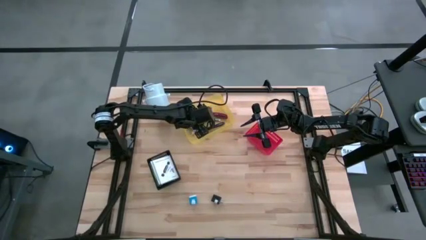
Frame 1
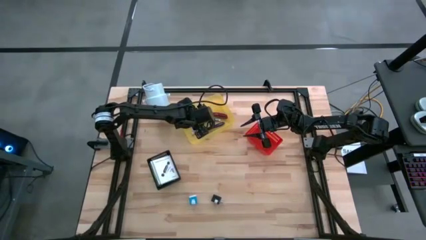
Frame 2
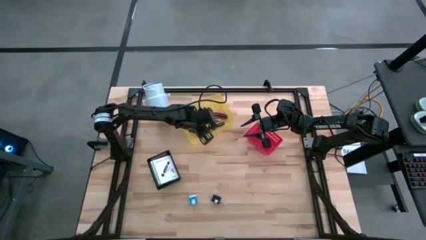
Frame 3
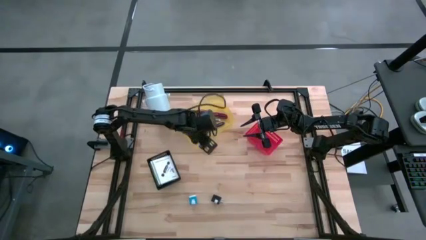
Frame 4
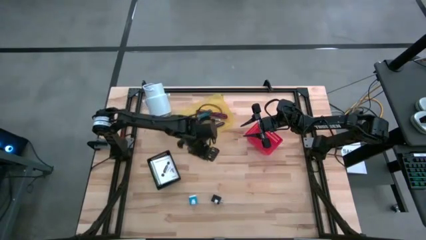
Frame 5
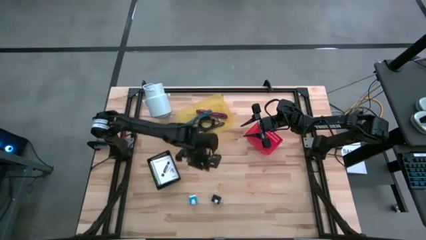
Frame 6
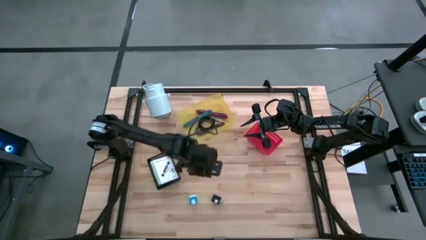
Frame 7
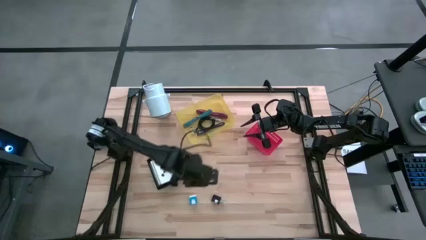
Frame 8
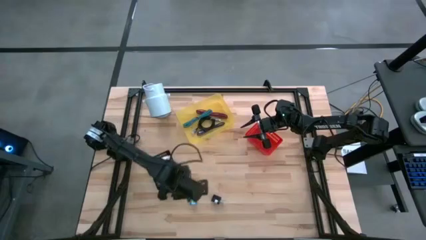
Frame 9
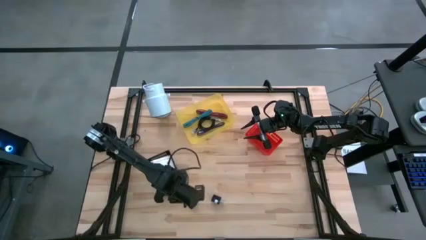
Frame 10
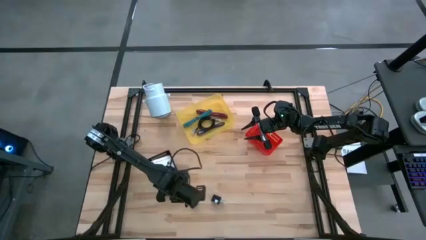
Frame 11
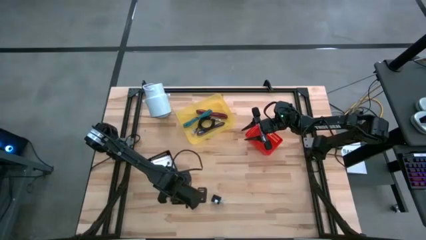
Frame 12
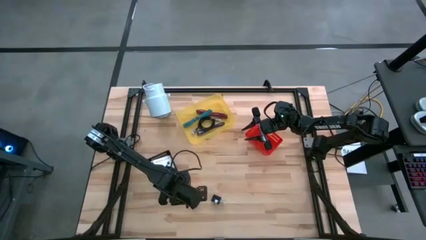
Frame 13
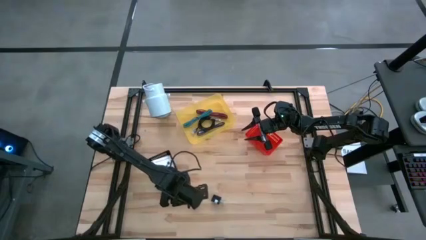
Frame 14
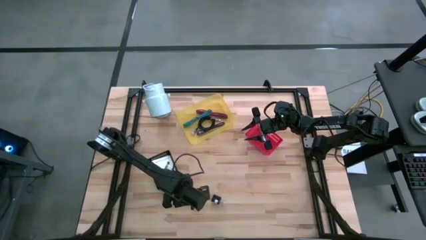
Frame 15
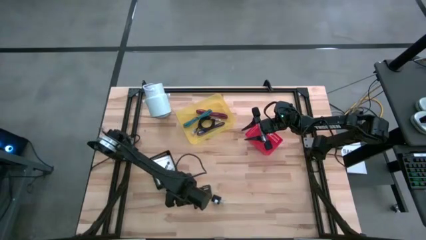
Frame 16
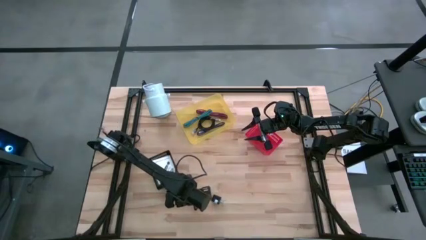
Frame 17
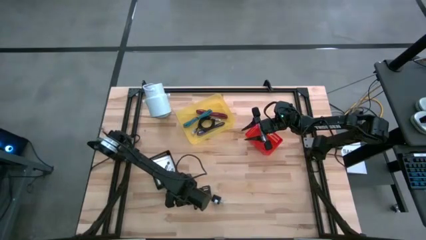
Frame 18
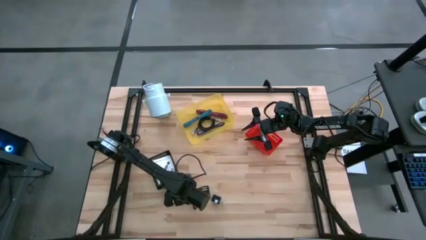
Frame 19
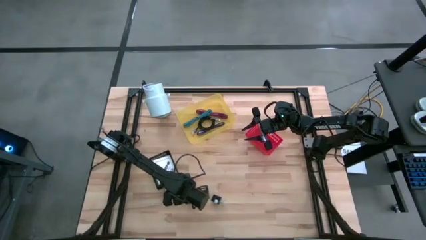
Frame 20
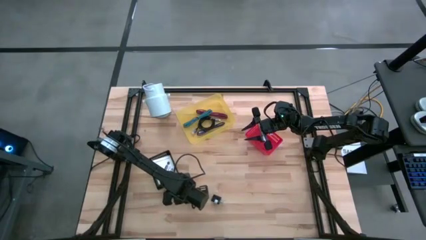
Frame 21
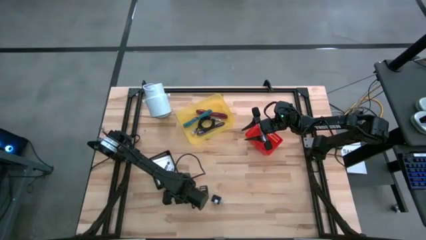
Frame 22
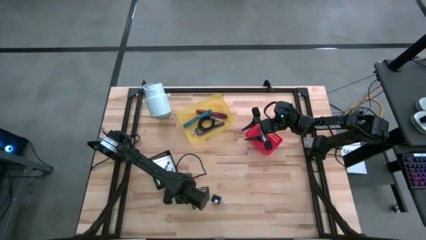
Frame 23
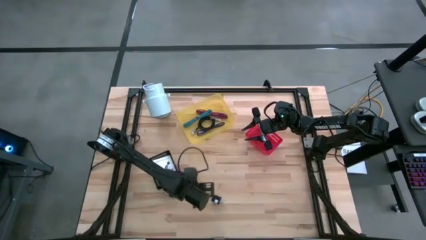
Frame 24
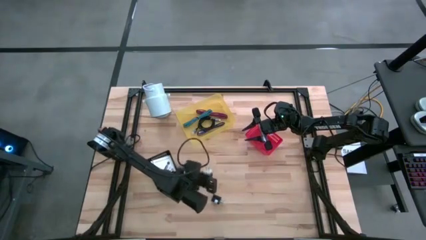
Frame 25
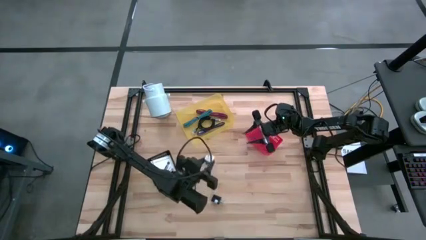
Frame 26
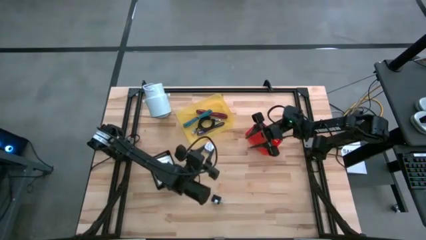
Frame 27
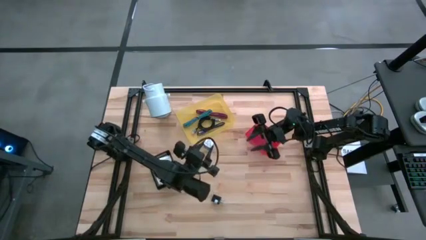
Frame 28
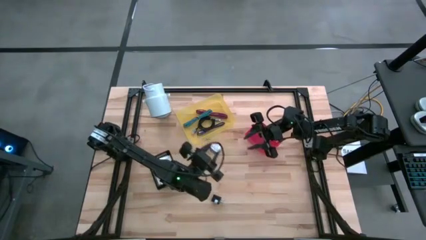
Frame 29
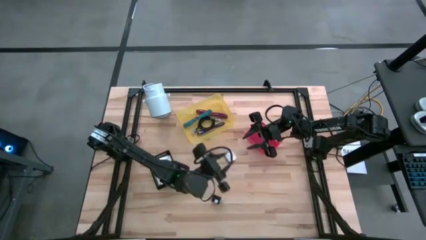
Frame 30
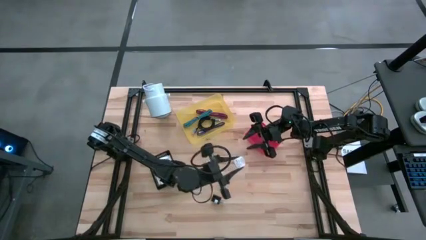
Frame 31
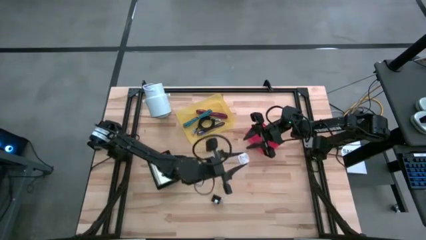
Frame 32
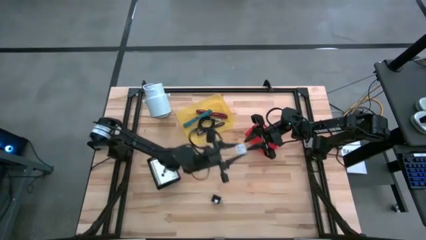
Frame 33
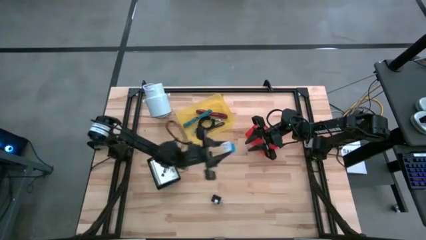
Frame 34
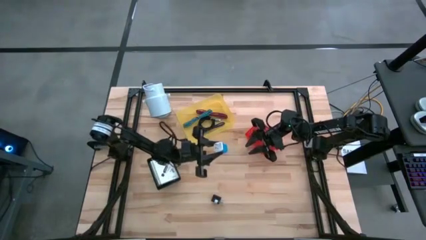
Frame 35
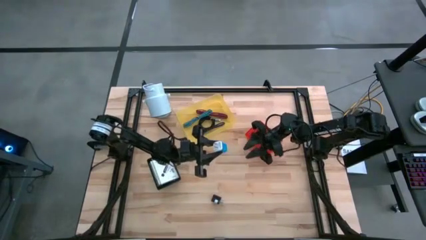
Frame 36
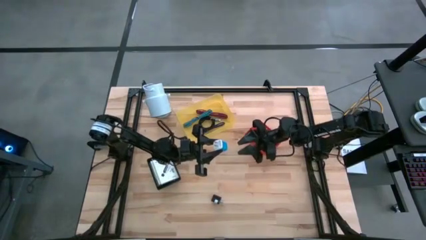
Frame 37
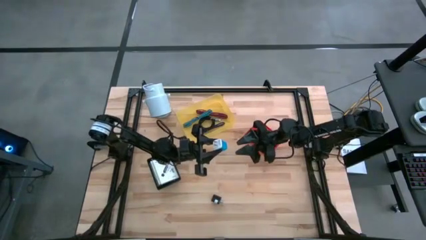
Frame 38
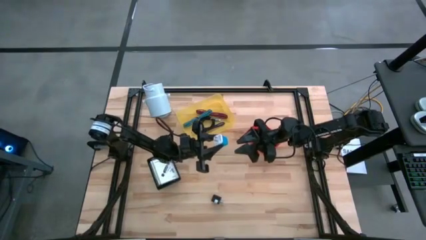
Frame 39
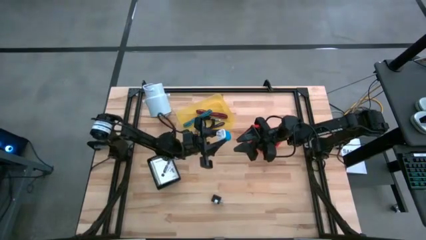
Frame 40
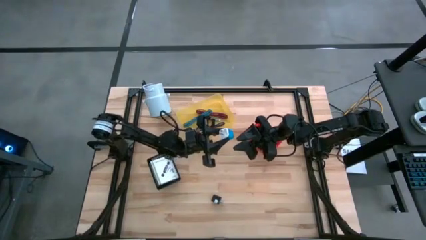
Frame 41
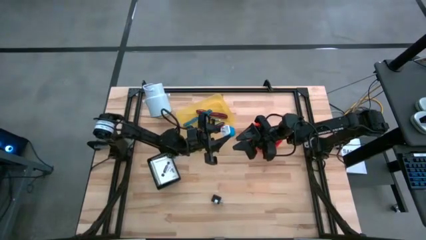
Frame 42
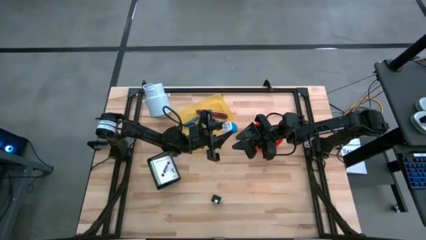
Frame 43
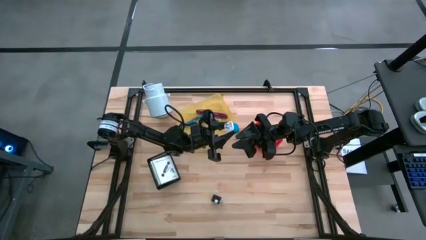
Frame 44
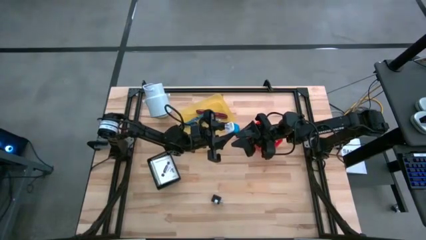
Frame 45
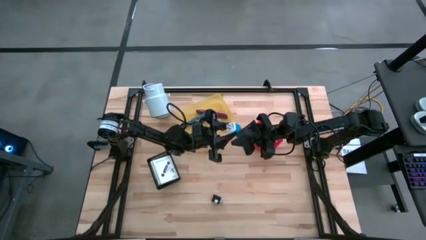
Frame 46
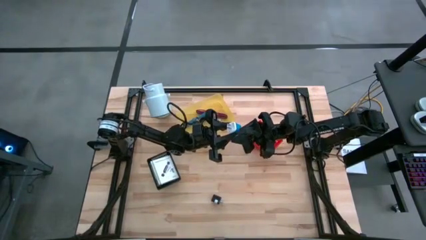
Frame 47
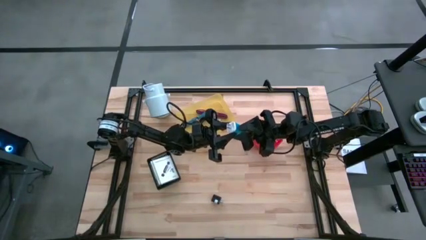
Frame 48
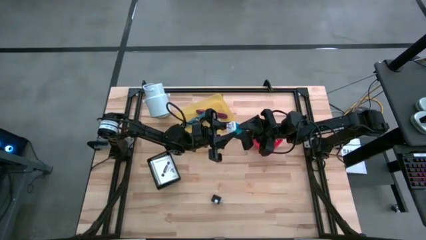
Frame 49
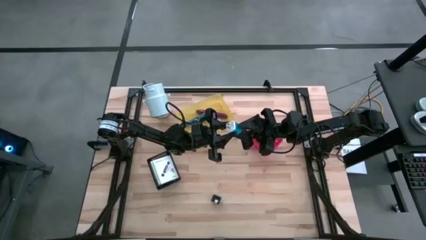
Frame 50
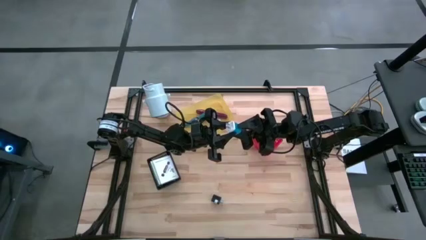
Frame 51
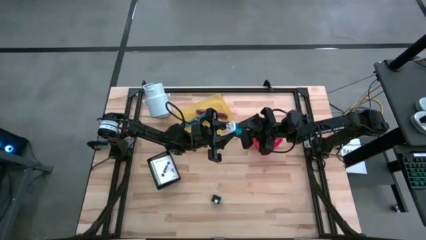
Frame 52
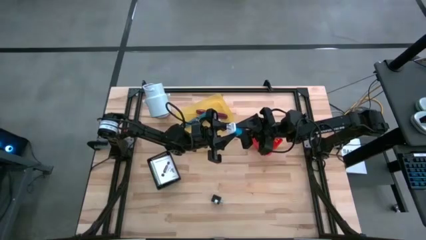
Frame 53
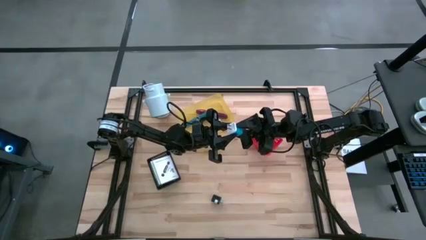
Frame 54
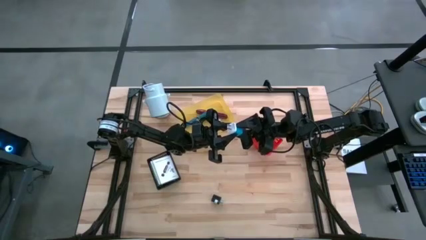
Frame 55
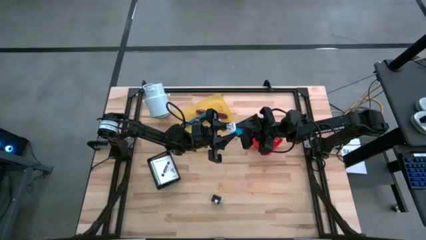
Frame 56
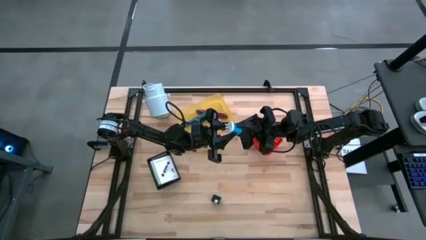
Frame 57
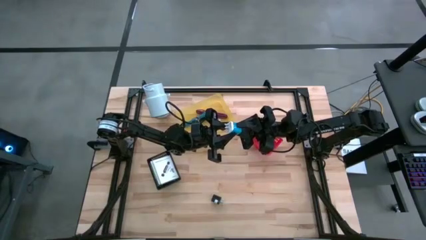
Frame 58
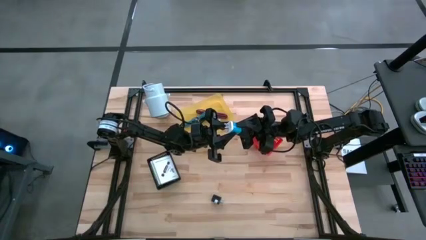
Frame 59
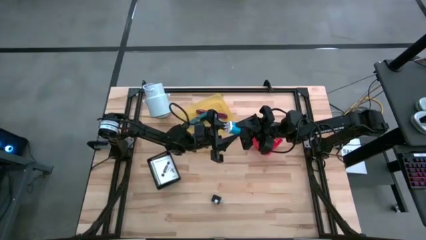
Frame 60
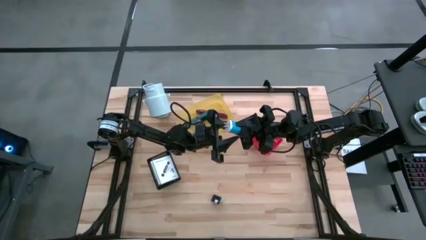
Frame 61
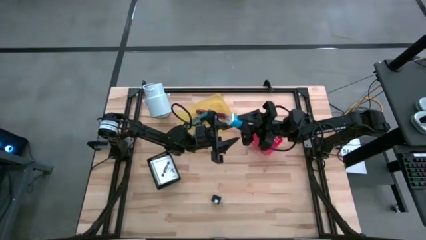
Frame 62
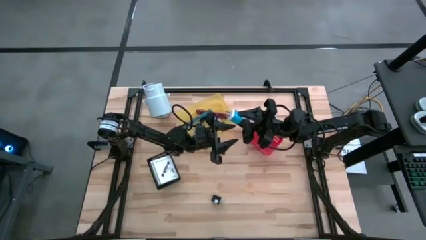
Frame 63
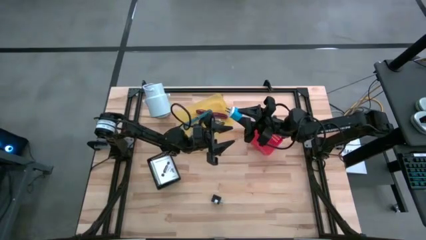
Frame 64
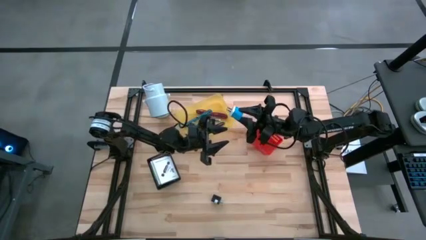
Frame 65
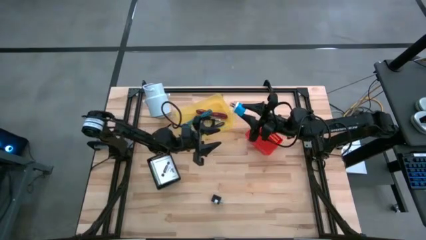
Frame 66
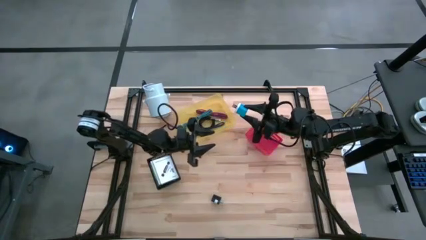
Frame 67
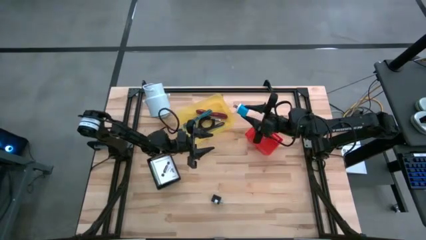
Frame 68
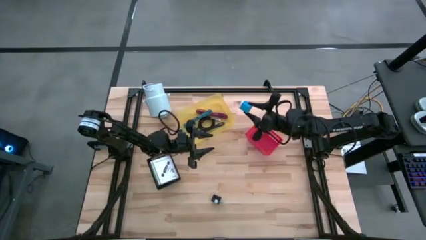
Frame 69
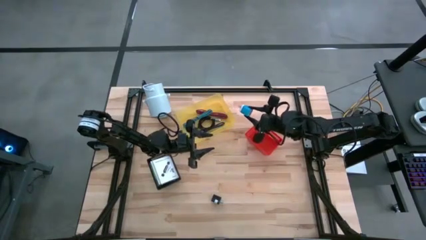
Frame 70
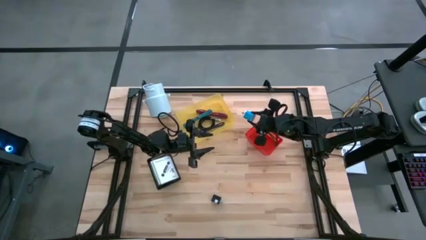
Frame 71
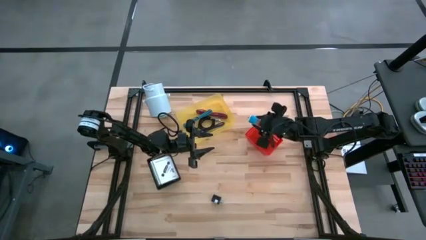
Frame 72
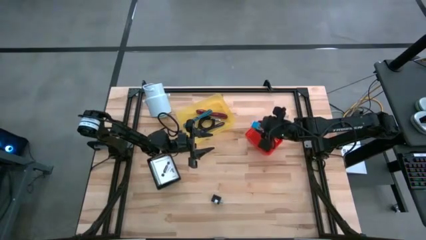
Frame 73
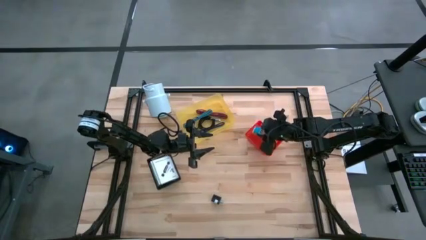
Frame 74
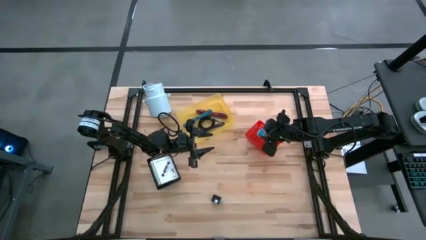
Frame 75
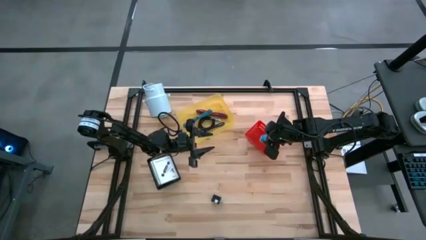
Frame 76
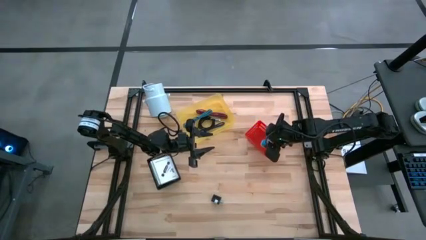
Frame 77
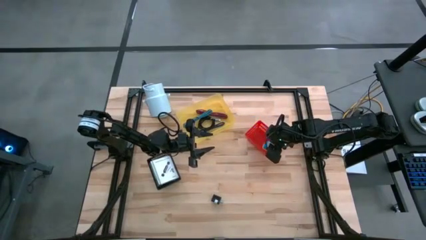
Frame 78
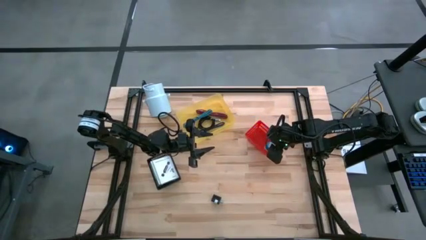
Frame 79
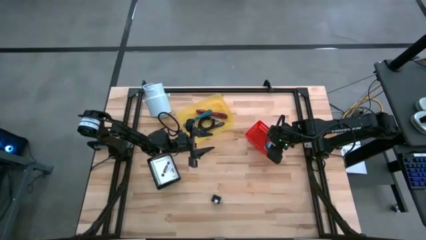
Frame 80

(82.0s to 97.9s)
Task: Pick and place items into bin
Put the blue charger adapter into the red bin
